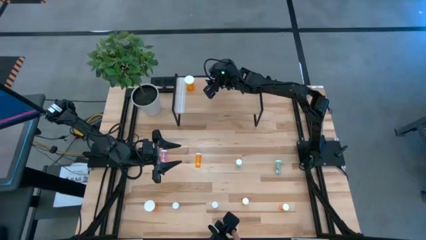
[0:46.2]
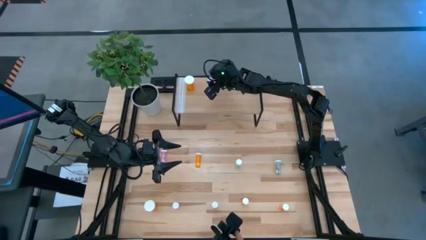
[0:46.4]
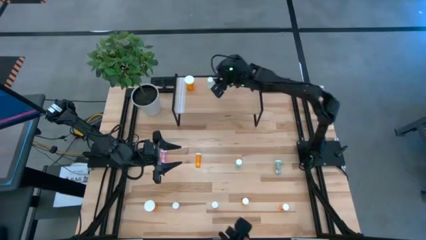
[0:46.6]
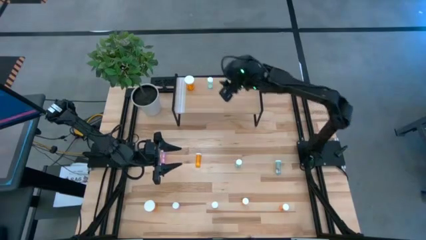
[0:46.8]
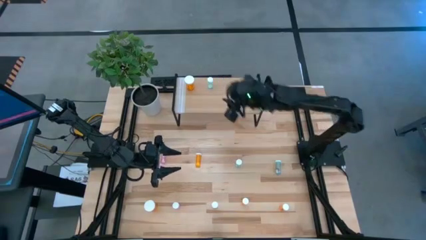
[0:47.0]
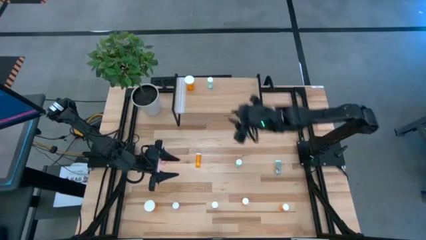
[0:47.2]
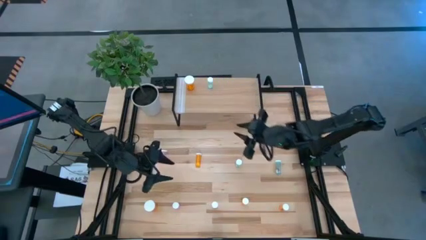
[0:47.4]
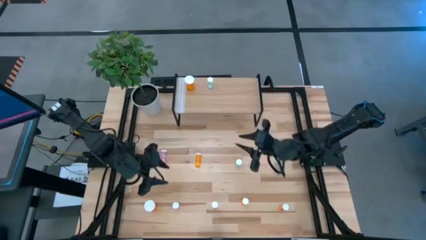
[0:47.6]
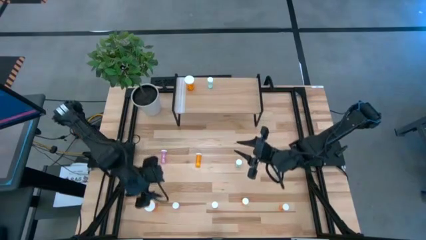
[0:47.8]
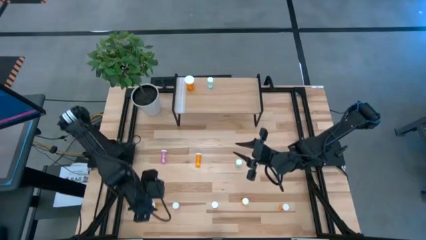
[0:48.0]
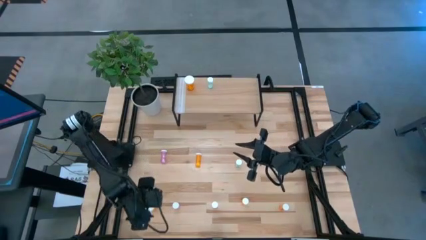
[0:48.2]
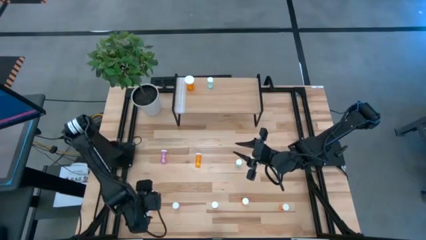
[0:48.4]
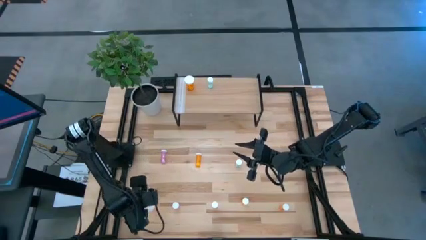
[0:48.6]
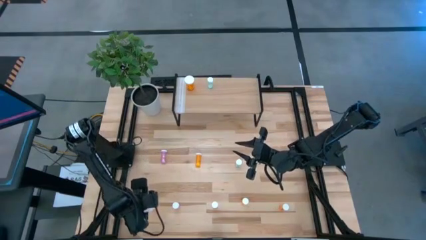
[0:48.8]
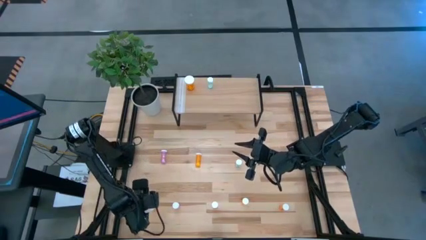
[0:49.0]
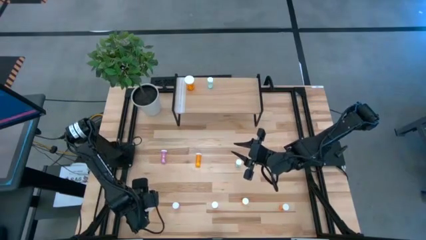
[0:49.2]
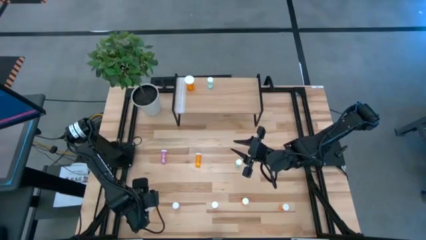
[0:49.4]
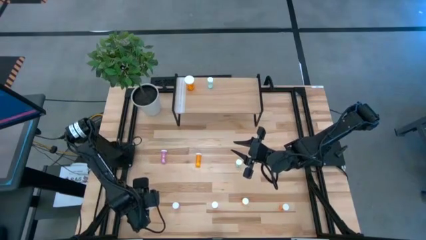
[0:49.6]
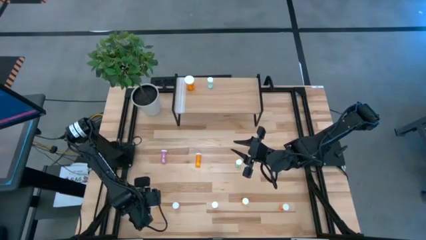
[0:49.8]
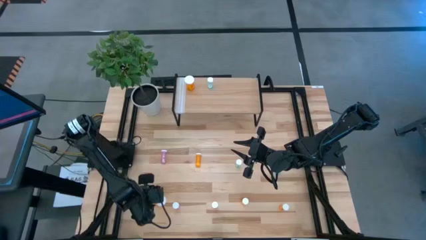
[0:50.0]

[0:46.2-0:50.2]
Task: Pick and place medicine bottles onto shelf by color
Put the large orange pill bottle on the shelf aligned with the other large orange pill bottle

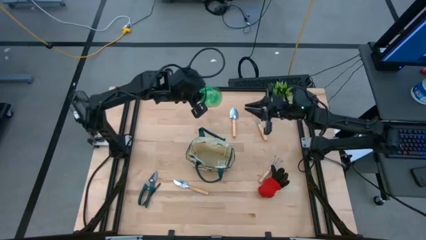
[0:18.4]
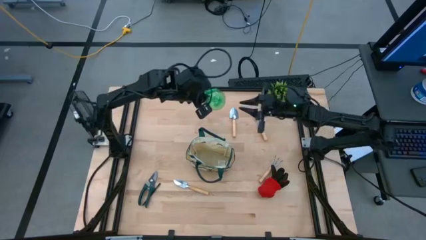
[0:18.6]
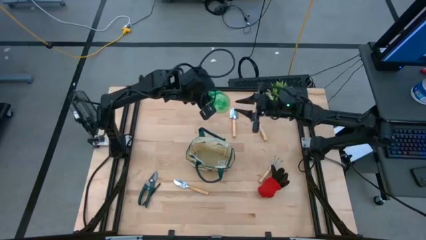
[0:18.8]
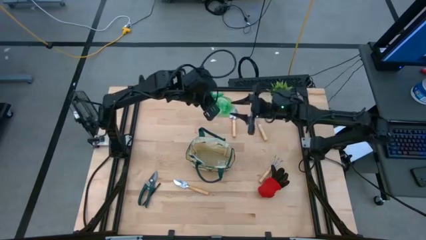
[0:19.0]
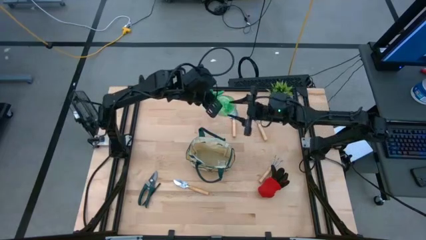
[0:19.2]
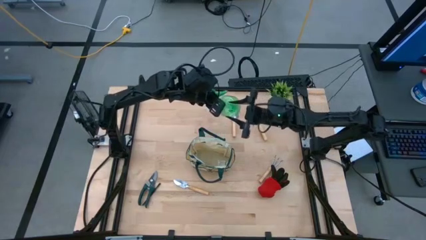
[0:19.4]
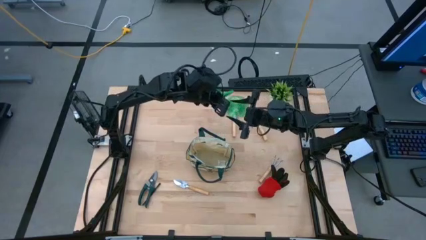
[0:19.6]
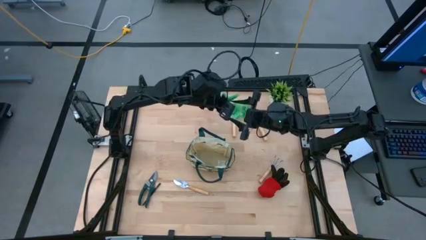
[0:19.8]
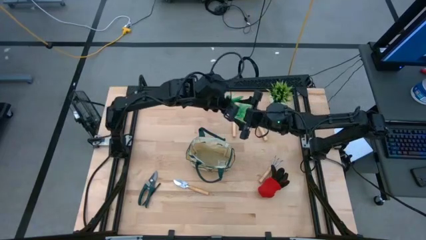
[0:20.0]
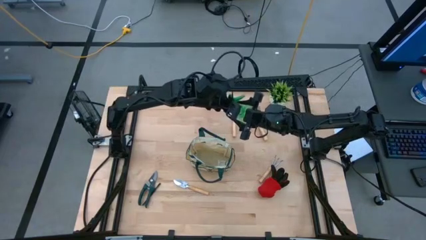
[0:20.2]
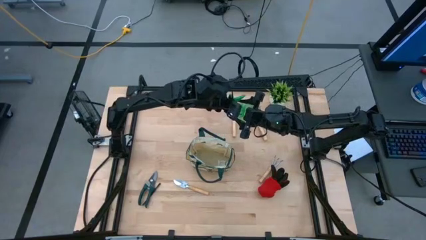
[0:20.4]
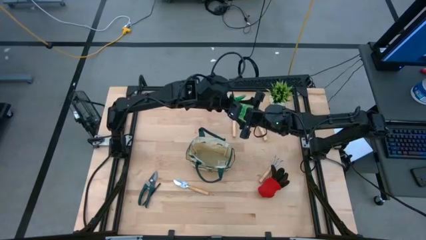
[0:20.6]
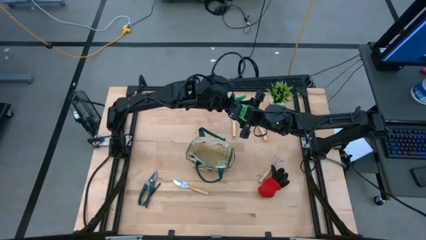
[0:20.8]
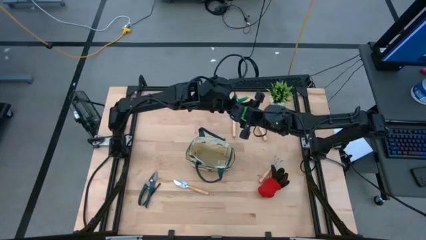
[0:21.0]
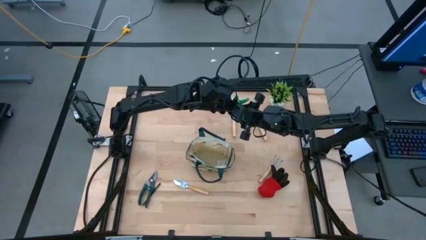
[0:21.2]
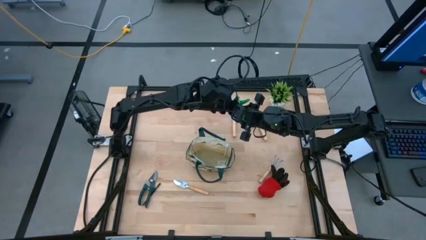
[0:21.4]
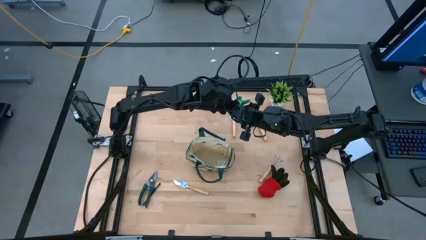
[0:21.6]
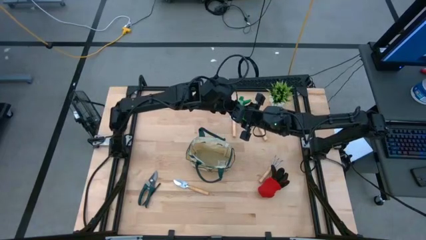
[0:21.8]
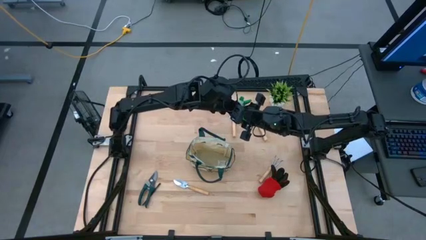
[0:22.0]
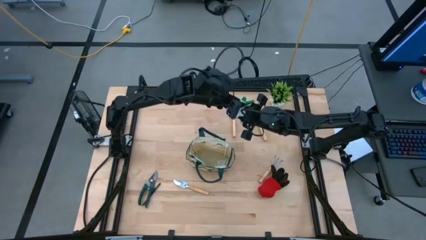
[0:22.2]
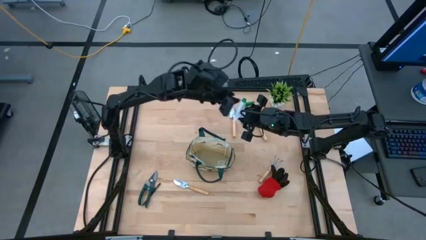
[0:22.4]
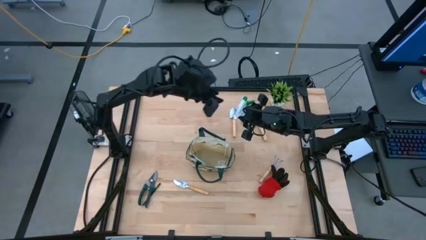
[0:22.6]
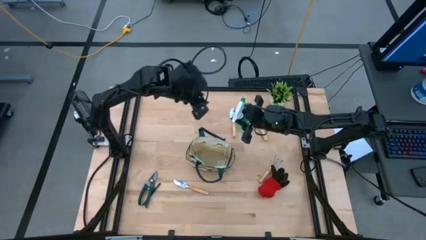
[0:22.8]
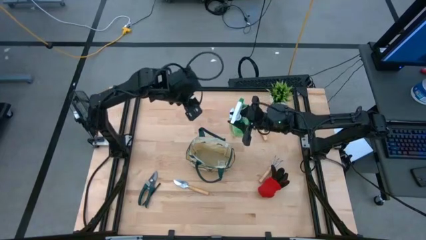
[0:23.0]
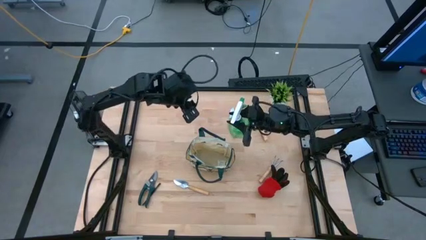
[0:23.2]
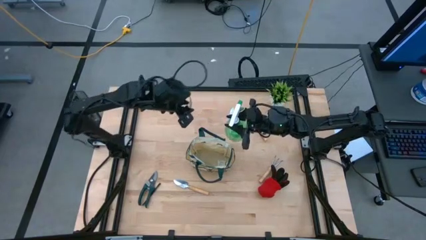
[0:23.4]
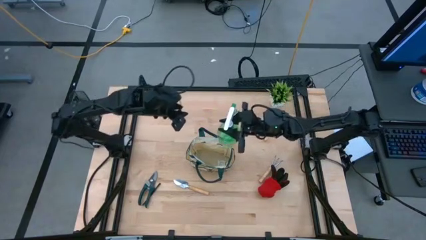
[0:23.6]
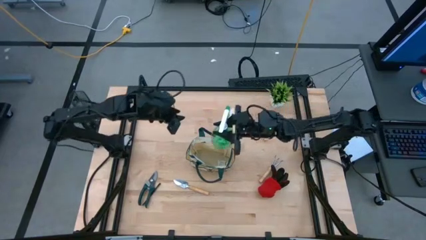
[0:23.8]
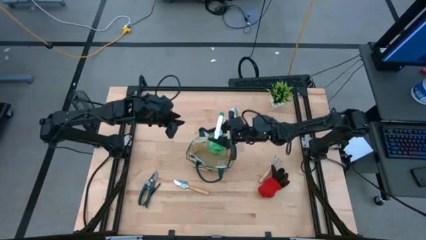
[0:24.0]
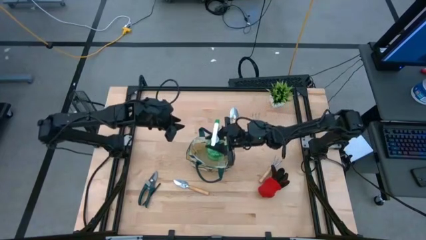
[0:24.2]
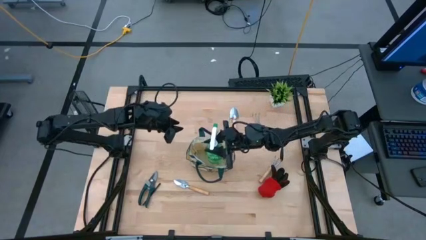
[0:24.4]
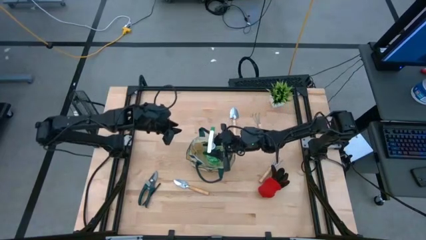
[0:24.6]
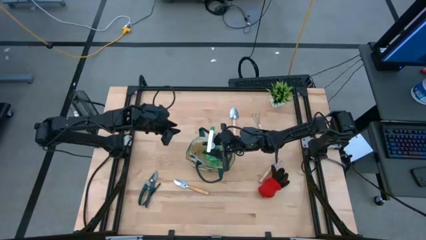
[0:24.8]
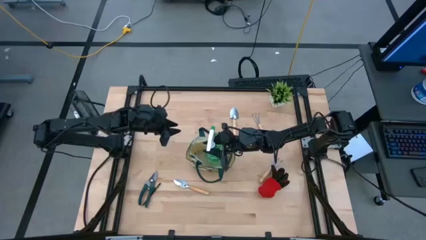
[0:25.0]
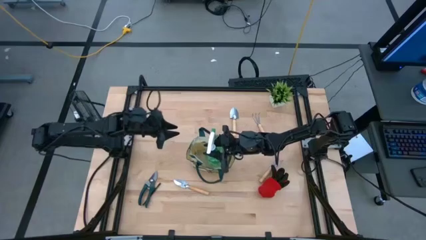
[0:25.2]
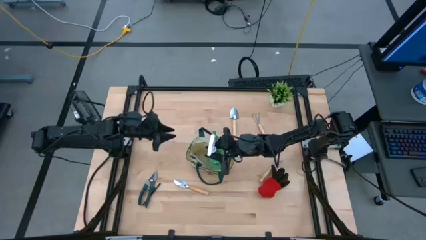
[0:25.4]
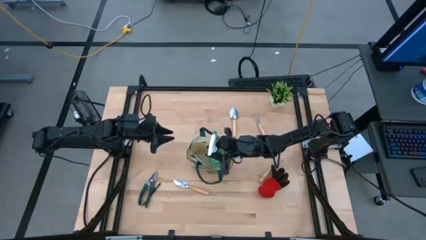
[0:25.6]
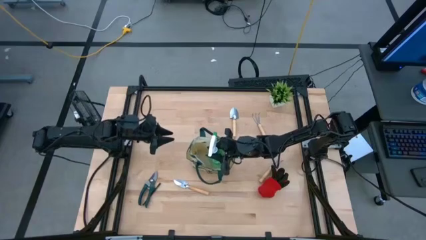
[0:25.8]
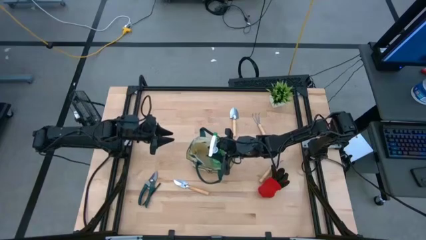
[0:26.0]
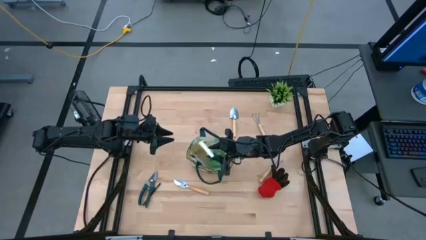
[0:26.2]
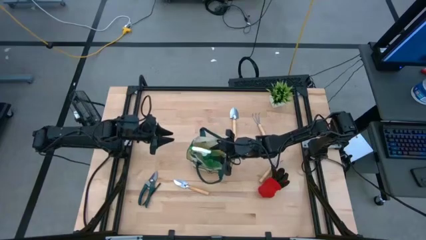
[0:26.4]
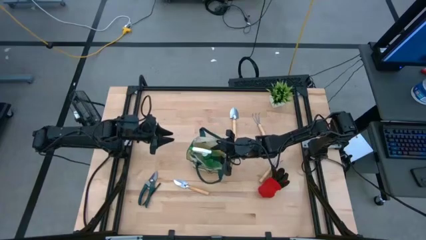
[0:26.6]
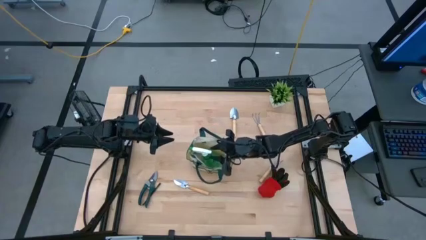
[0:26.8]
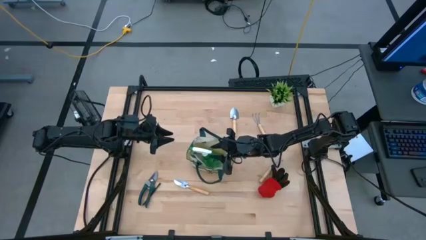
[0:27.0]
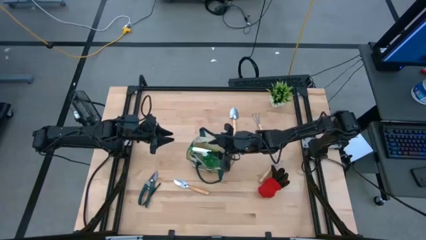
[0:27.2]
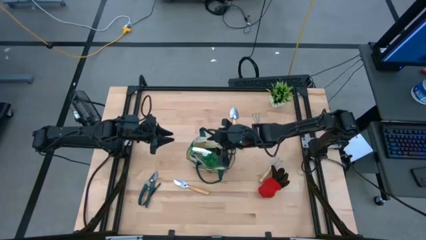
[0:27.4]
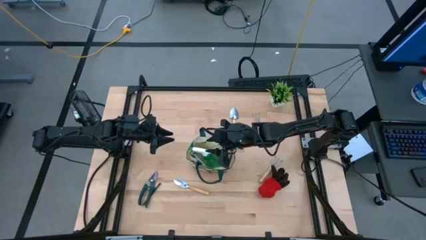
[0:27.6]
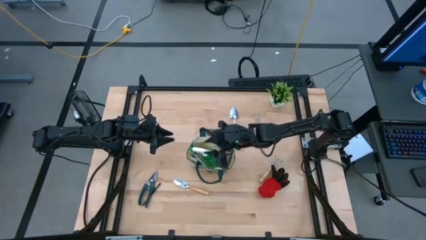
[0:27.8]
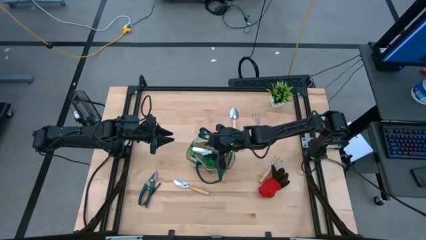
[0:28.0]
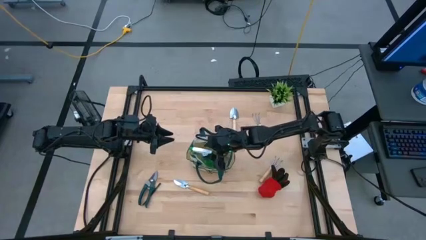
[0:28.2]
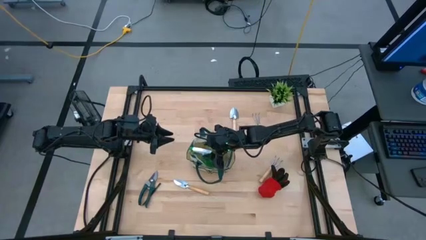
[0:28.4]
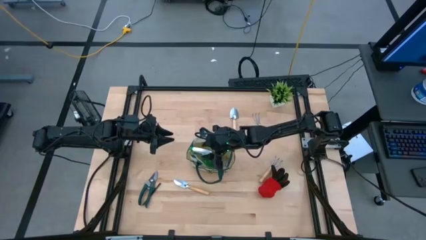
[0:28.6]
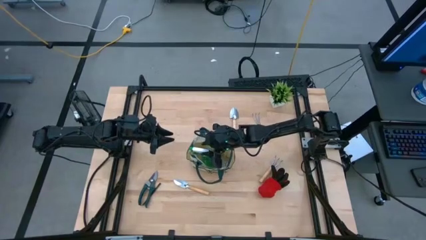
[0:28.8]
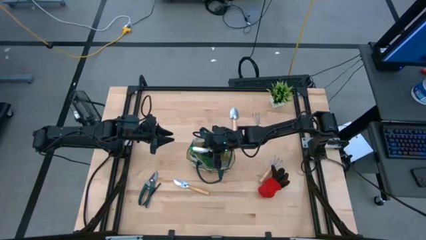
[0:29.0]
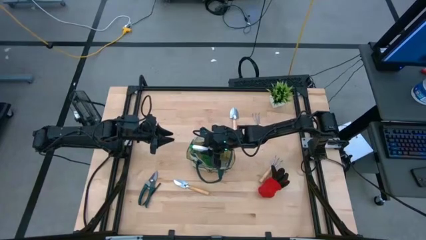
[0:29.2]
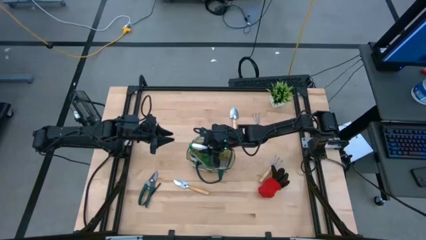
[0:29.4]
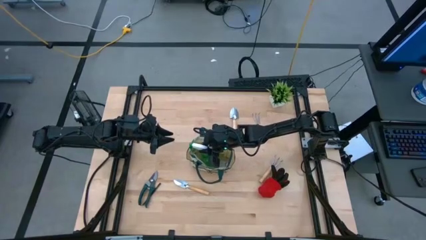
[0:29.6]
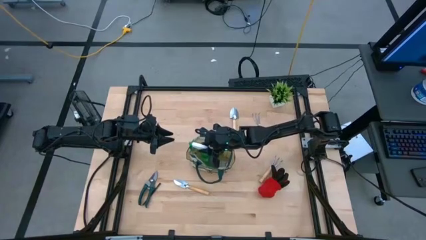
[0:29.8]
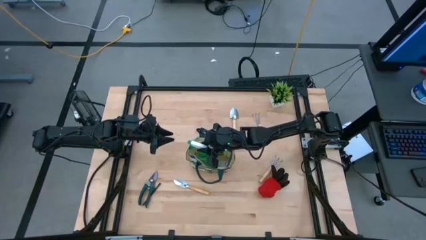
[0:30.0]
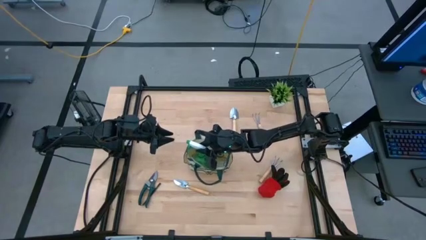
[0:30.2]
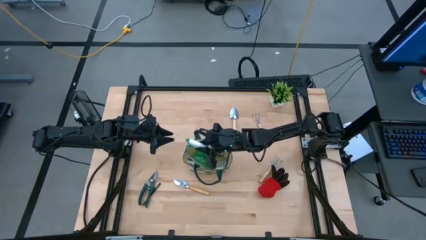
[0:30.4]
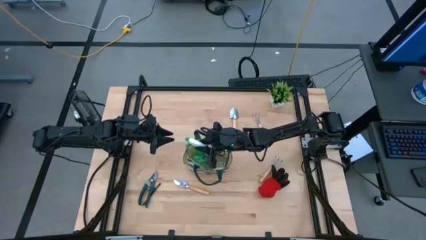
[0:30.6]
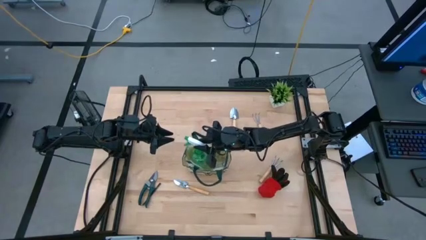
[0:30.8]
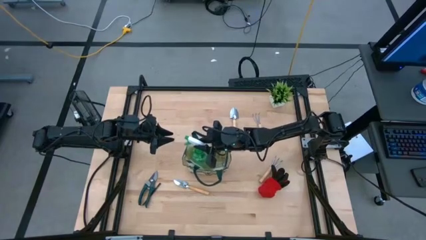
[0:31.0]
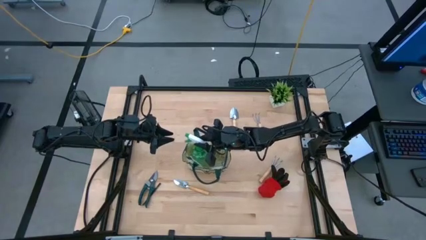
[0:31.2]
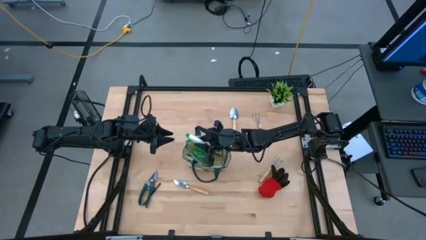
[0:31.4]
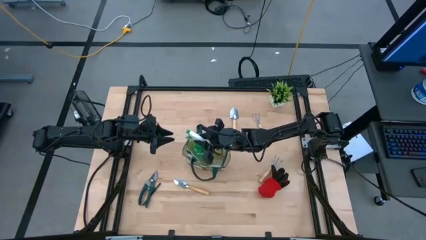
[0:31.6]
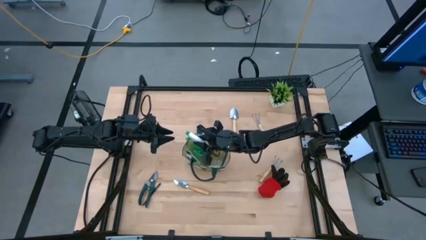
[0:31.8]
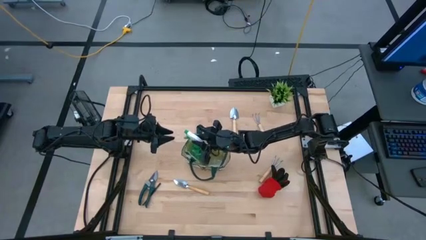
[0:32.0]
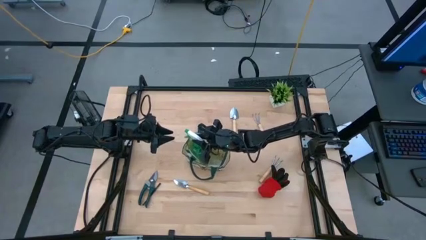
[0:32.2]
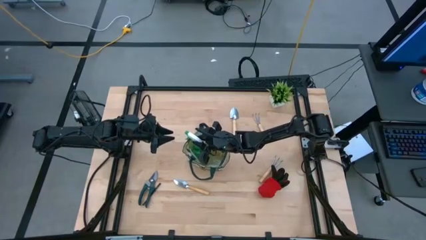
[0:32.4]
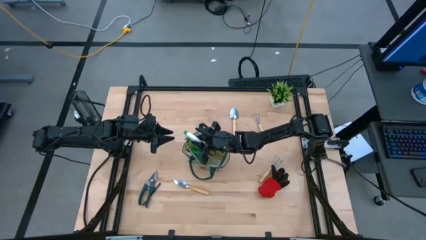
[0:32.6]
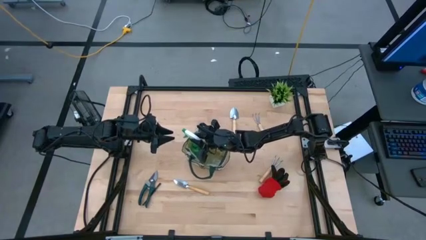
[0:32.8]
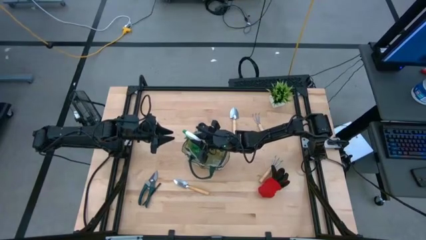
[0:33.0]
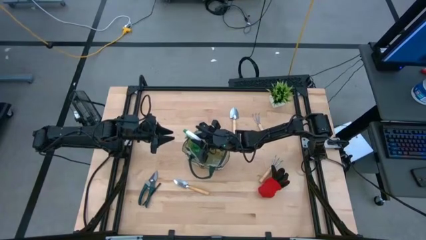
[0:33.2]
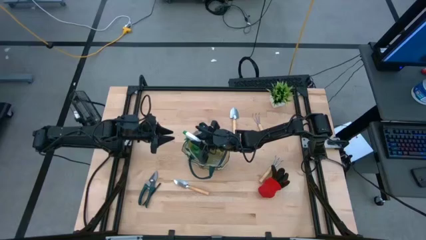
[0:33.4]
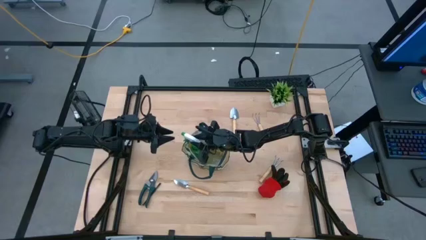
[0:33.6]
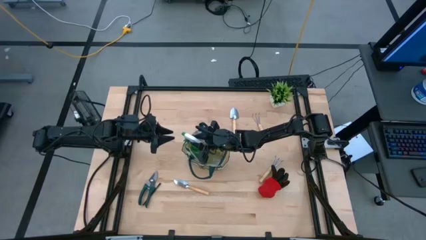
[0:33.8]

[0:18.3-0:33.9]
Task: Pick & Place Garden tools in Gardening bag
Put the green spray bottle into the gardening bag
